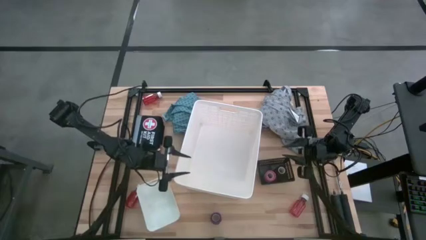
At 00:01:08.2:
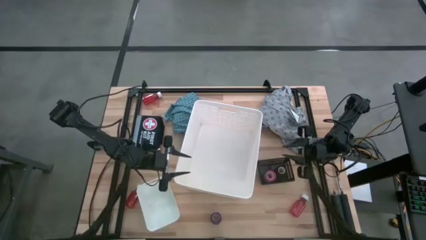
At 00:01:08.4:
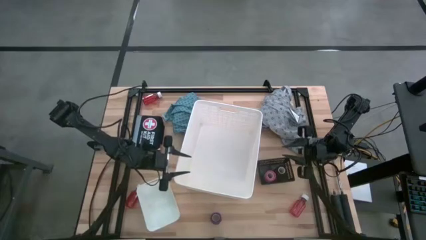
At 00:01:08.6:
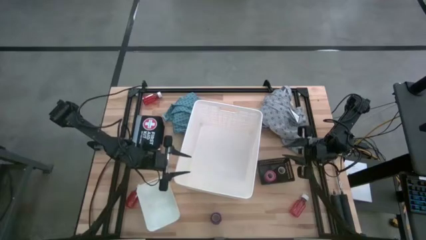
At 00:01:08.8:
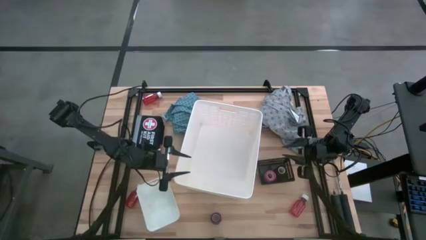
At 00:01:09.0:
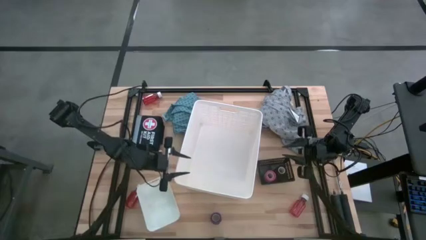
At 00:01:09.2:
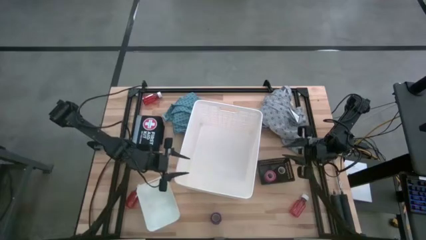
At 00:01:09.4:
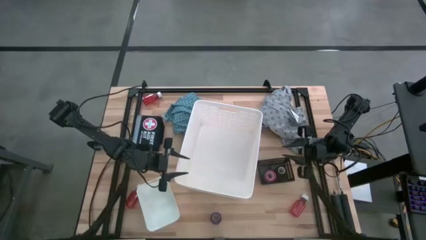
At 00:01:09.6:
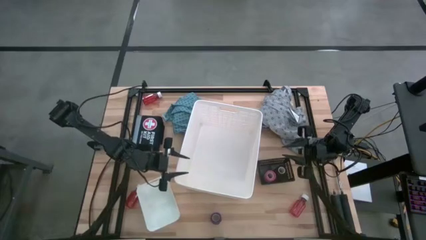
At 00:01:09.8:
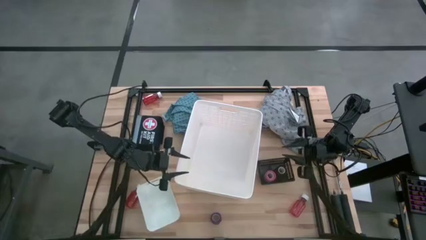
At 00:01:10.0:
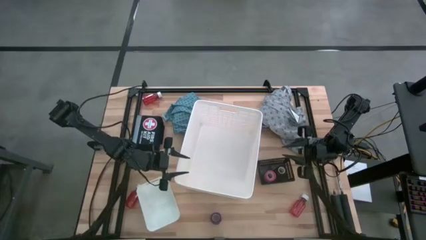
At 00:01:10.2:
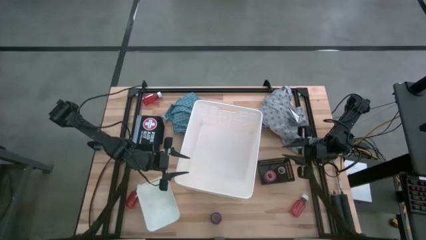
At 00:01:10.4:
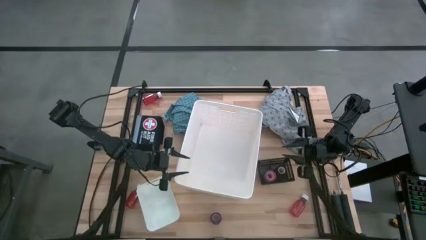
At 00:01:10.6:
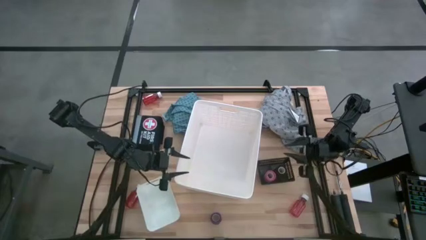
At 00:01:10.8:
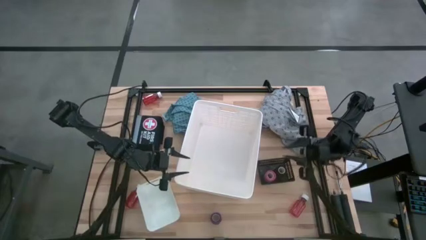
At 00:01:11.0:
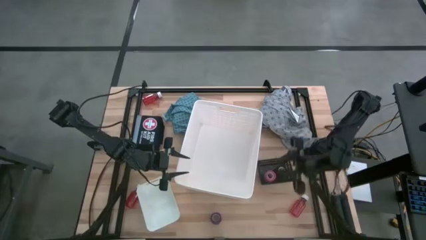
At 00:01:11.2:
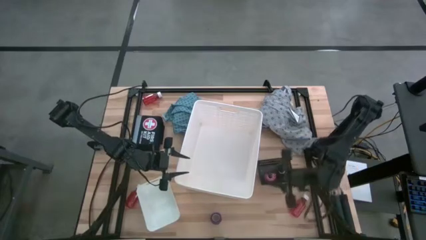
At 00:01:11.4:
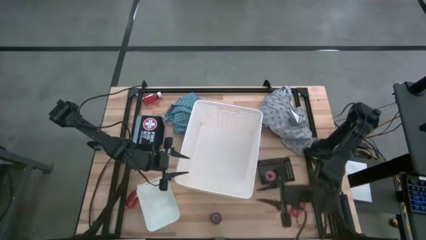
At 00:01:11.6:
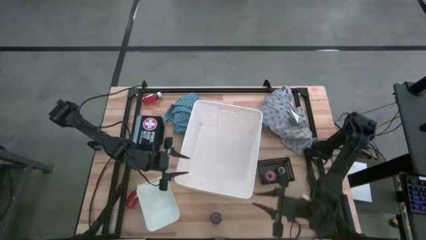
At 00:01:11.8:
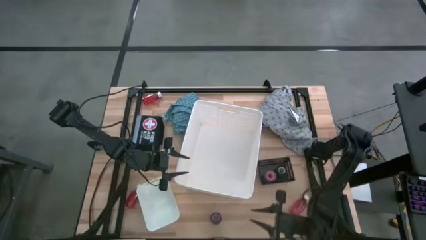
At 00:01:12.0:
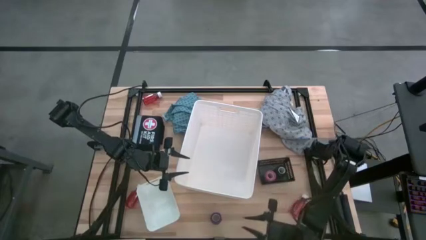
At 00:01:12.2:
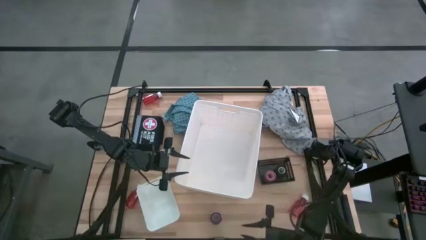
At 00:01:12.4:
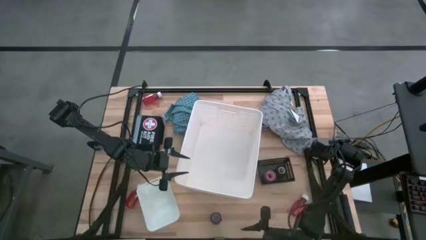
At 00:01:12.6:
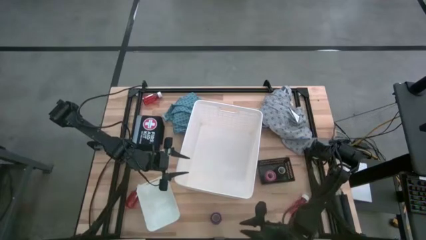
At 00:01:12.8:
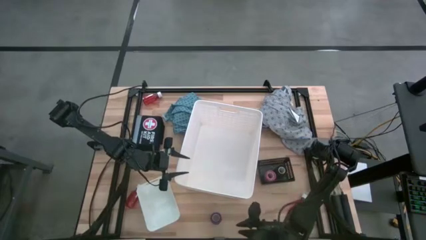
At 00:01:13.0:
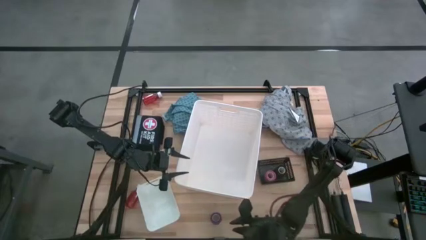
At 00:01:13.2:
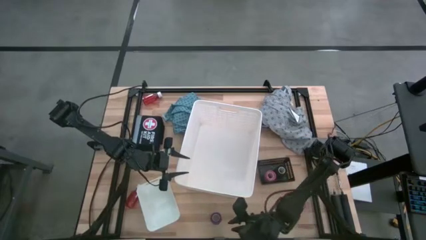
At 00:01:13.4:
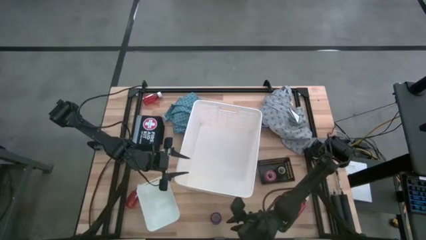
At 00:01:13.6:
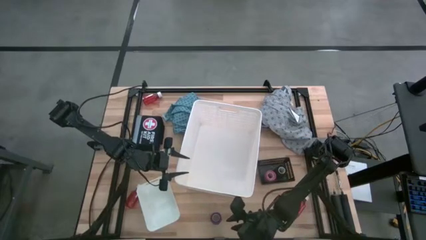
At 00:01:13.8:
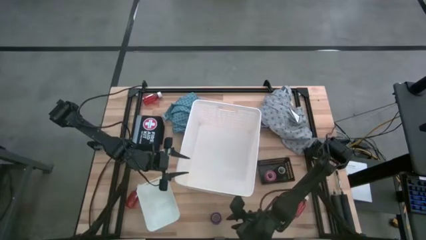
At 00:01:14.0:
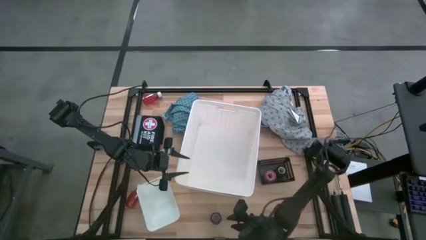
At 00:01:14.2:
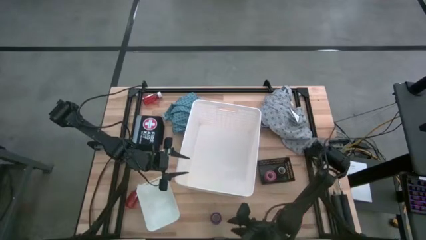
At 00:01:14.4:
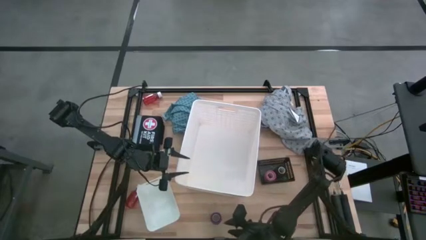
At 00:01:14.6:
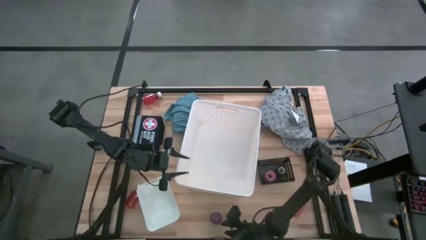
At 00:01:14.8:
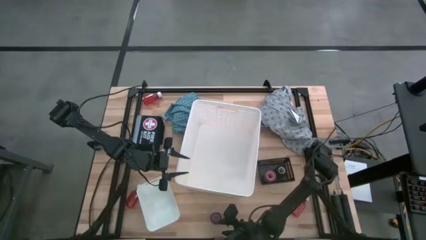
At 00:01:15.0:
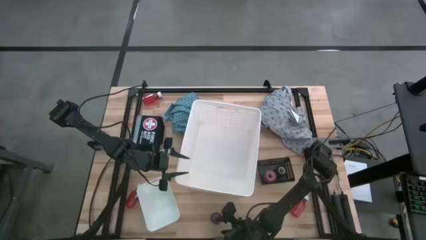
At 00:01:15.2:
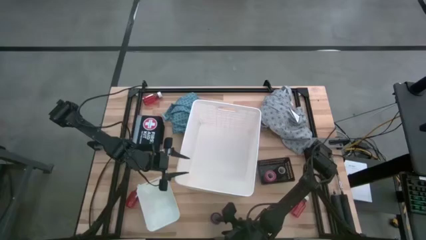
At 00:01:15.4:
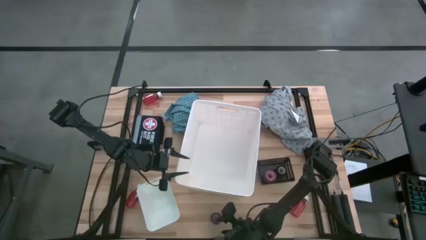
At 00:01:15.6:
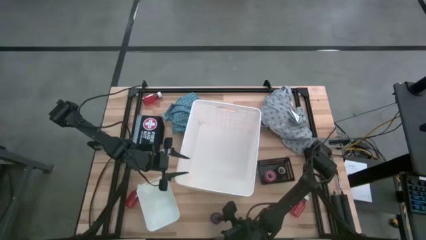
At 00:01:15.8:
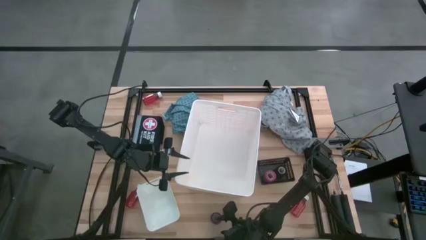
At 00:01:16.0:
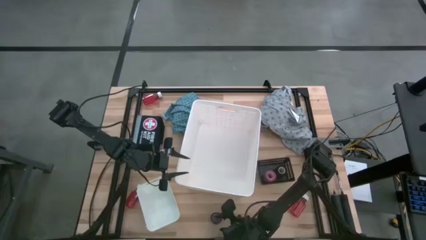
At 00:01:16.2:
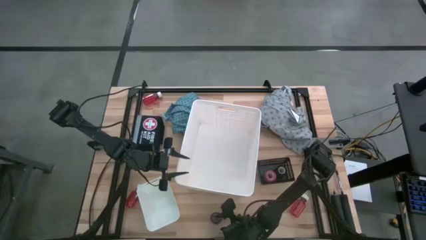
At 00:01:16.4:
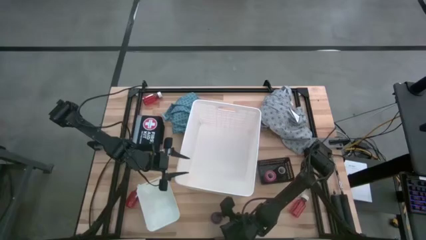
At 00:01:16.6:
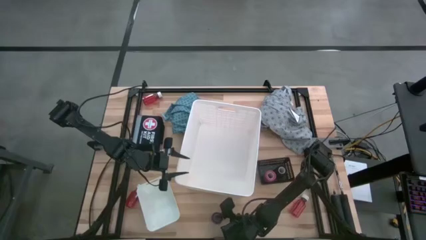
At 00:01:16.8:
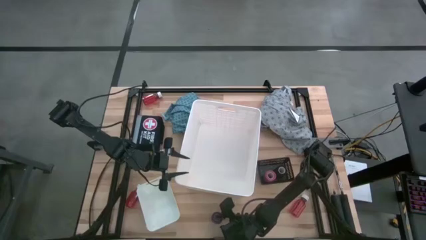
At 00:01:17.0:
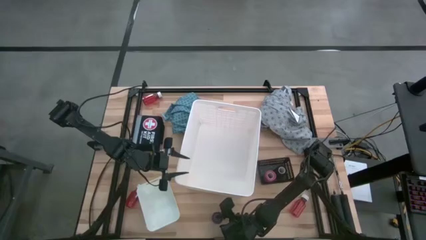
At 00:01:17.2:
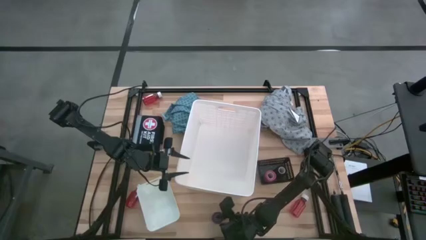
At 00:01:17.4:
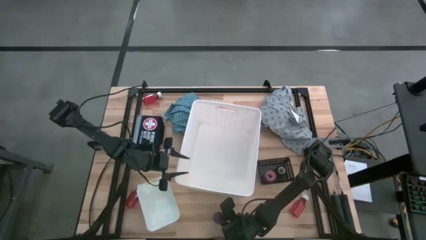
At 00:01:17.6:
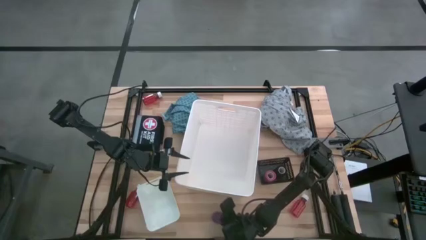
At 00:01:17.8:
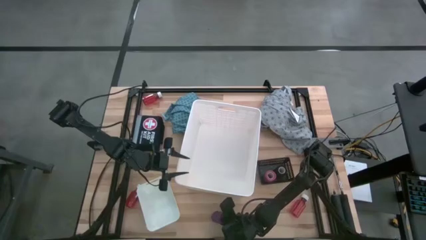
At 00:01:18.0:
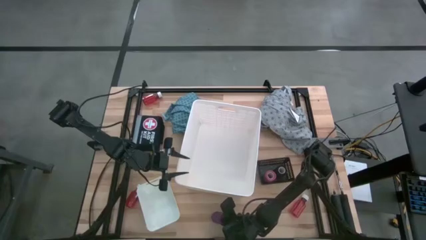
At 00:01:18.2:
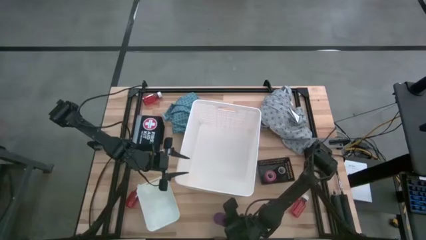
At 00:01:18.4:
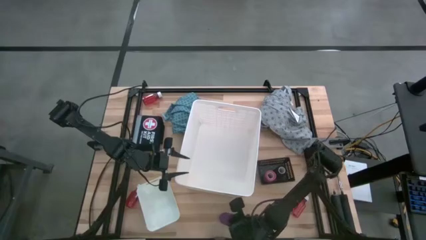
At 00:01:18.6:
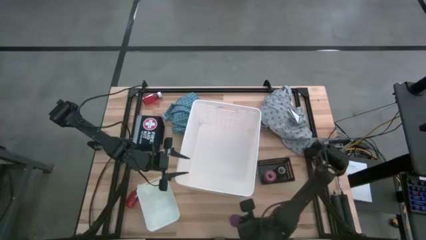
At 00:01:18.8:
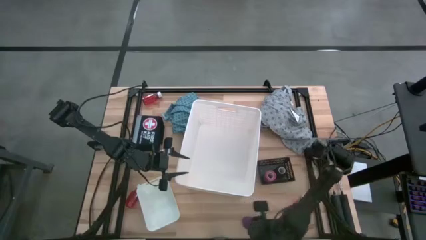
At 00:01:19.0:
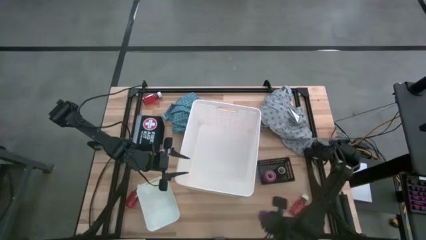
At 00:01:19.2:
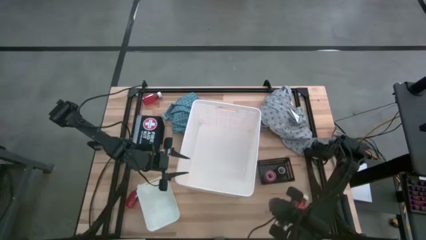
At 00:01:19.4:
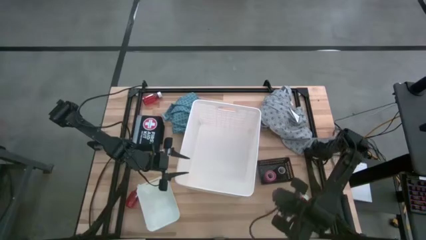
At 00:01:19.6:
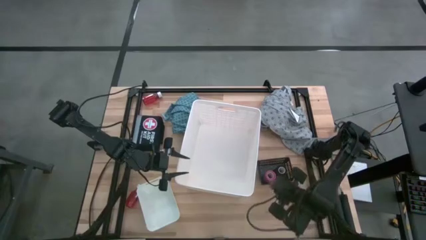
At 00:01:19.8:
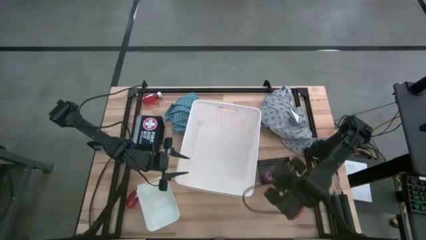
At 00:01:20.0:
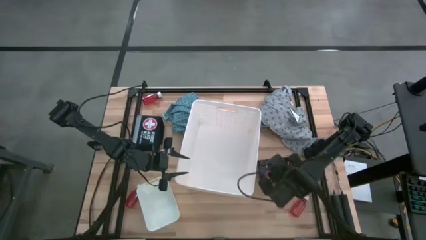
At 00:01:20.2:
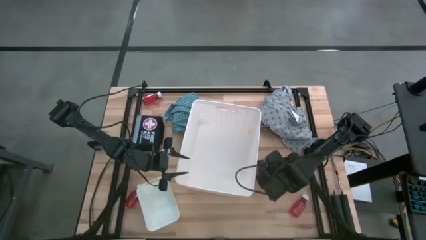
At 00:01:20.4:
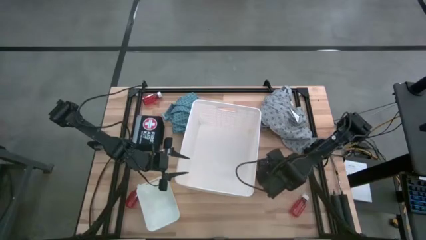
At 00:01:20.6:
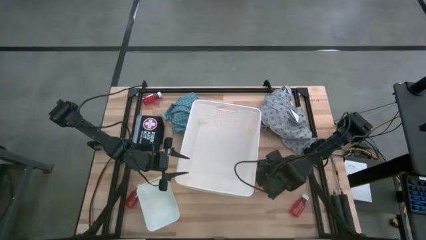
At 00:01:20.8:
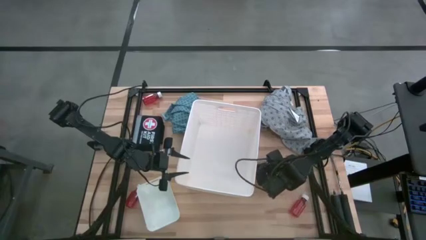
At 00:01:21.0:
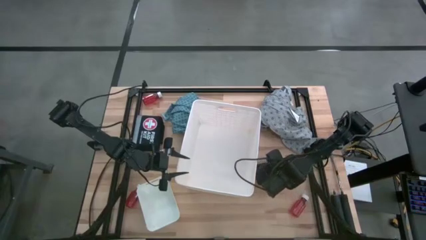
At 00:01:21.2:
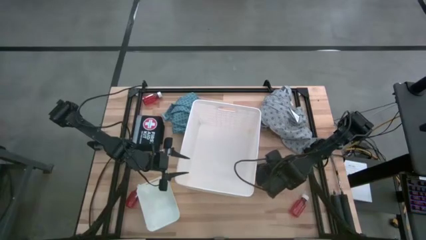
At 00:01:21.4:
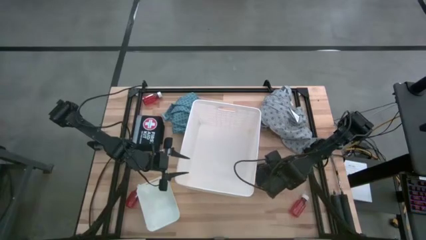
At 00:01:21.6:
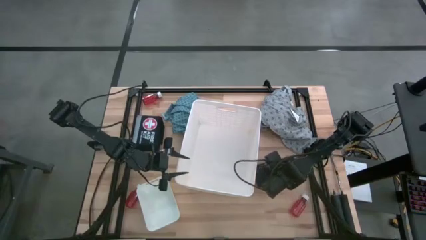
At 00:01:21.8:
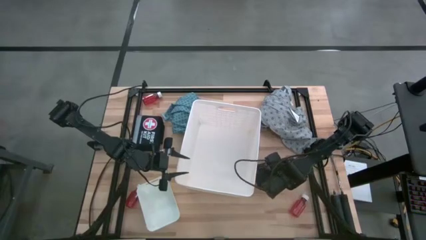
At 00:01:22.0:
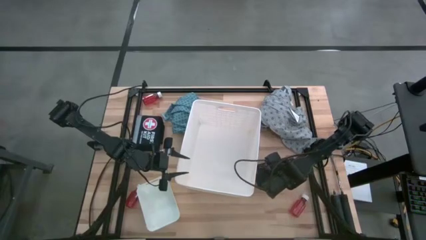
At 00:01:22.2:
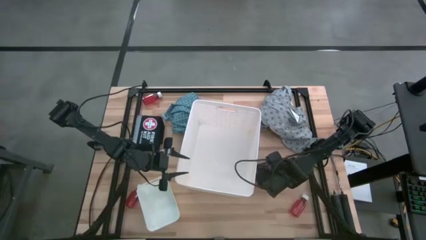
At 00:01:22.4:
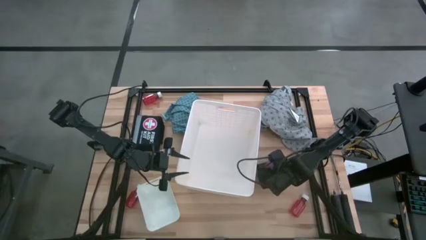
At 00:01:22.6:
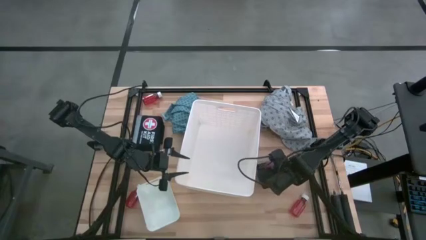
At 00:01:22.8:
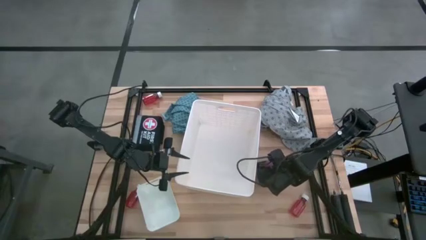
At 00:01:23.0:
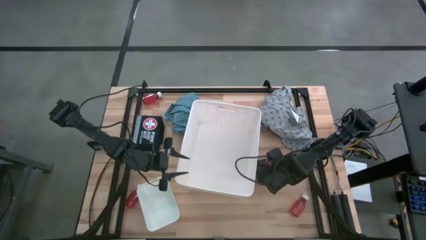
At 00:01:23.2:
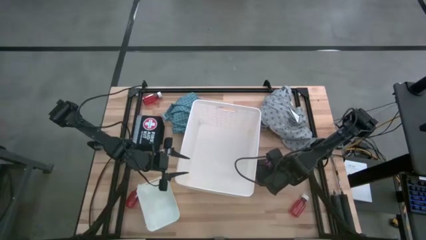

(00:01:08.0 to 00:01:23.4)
Task: Pick & place medical supplies in basket/bin
Put the violet bandage into the black bin
